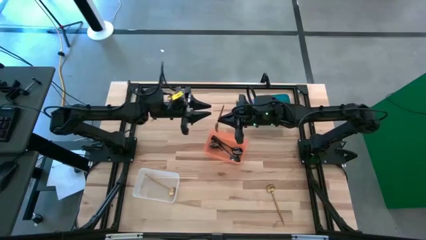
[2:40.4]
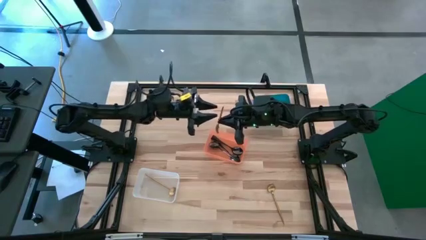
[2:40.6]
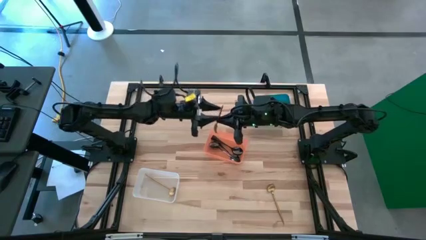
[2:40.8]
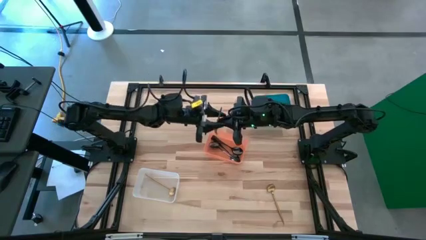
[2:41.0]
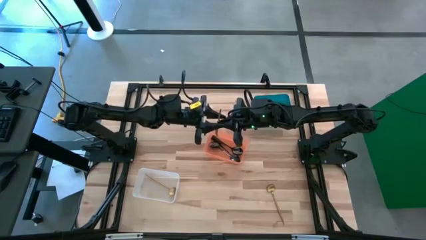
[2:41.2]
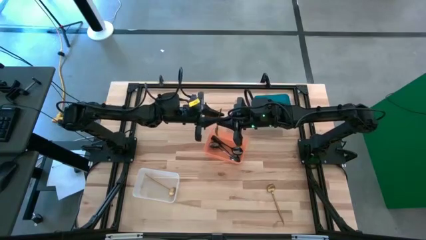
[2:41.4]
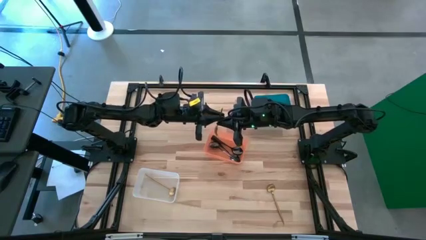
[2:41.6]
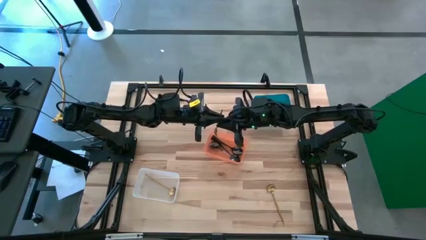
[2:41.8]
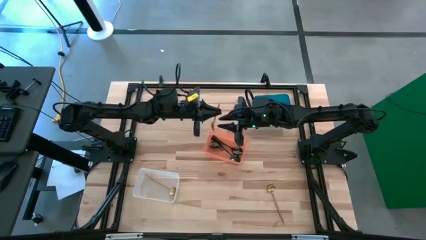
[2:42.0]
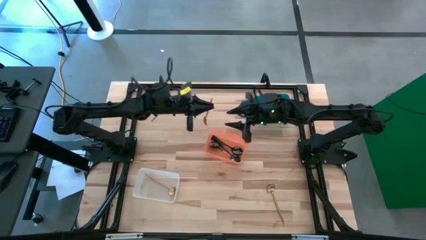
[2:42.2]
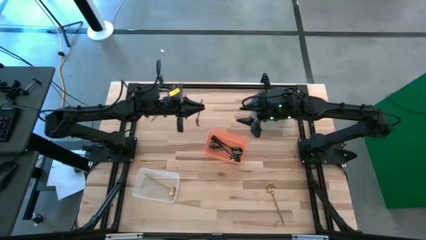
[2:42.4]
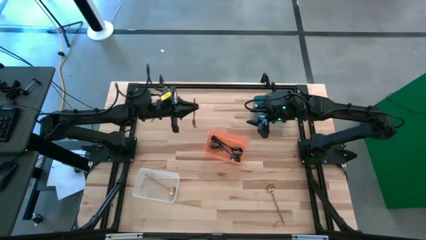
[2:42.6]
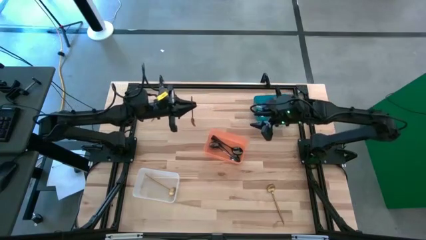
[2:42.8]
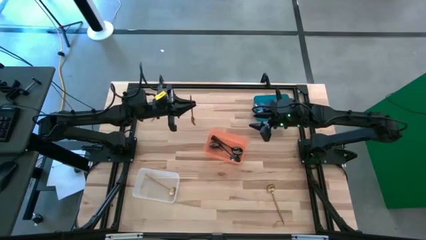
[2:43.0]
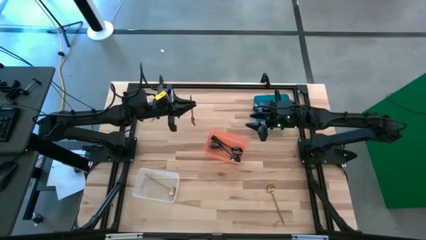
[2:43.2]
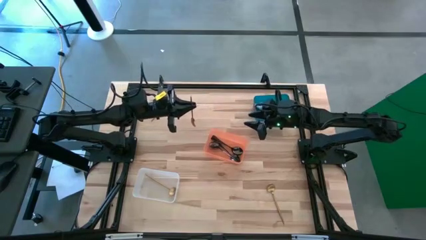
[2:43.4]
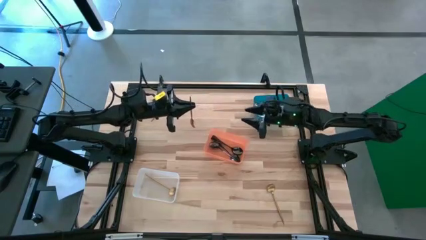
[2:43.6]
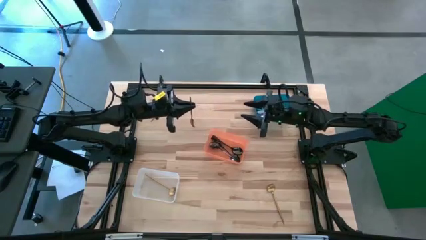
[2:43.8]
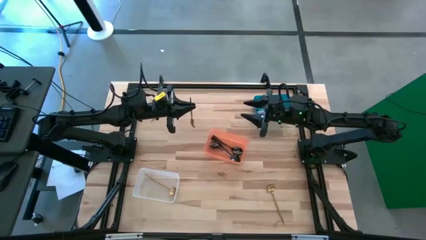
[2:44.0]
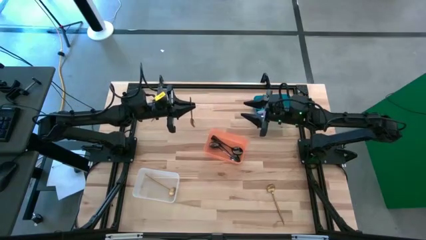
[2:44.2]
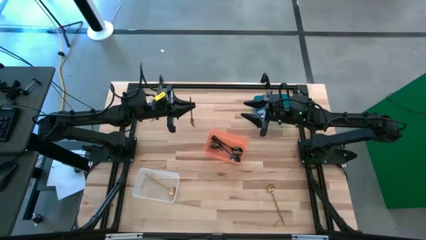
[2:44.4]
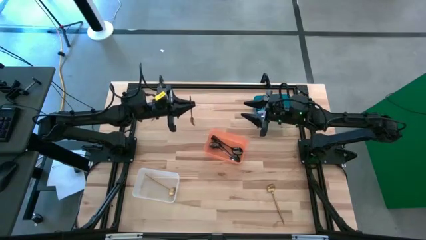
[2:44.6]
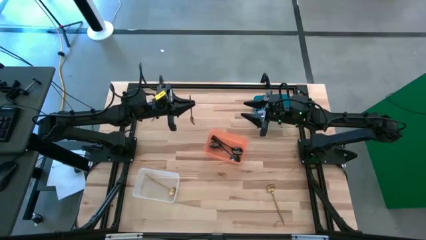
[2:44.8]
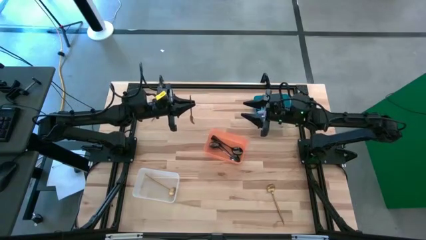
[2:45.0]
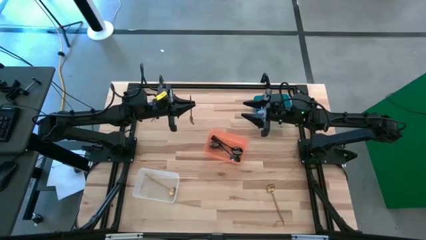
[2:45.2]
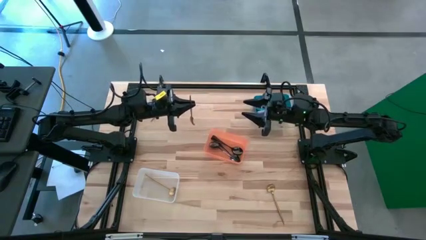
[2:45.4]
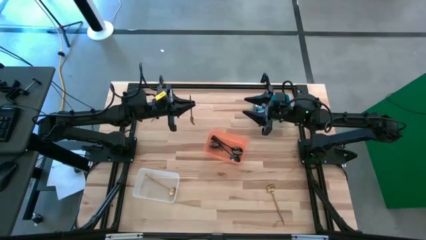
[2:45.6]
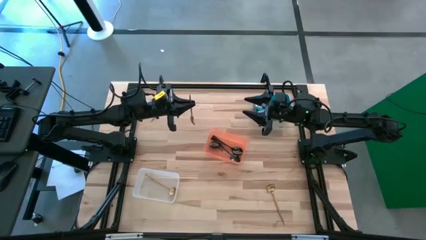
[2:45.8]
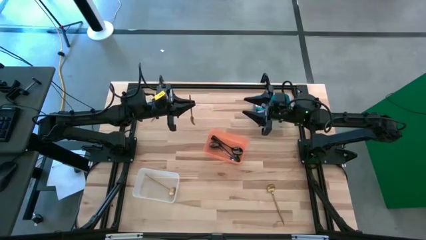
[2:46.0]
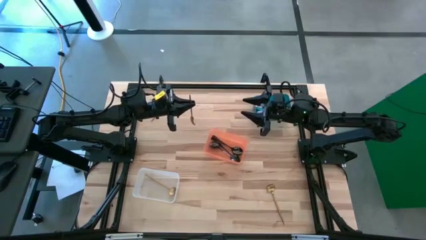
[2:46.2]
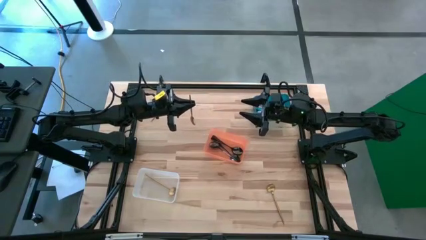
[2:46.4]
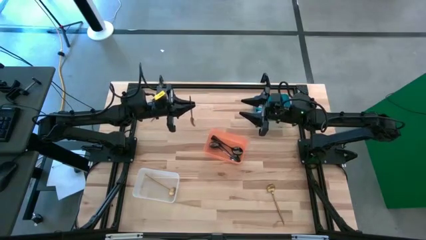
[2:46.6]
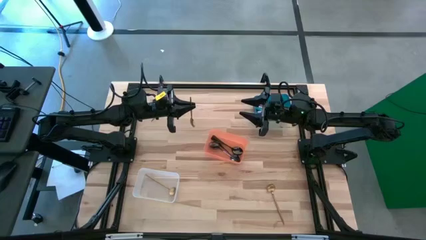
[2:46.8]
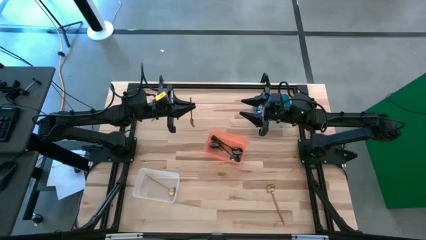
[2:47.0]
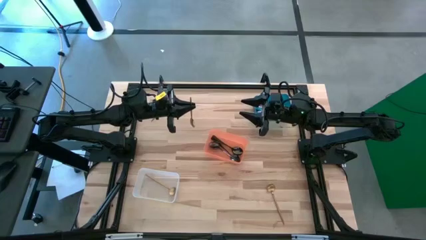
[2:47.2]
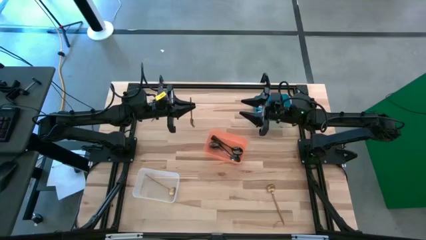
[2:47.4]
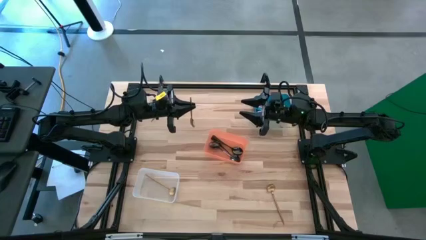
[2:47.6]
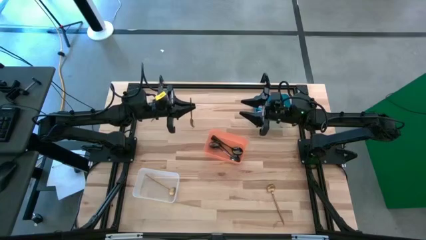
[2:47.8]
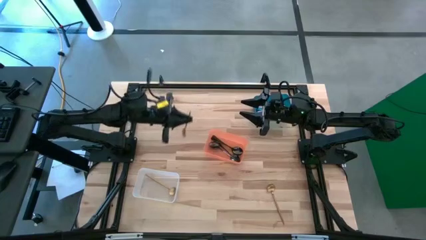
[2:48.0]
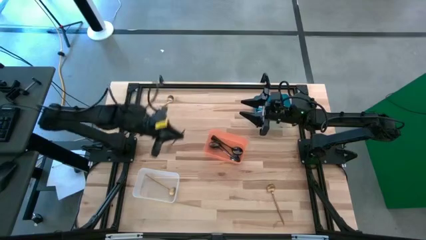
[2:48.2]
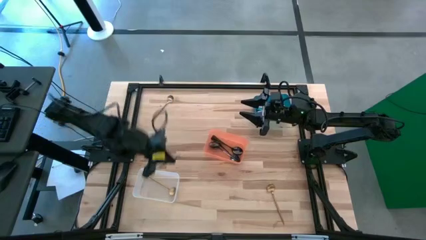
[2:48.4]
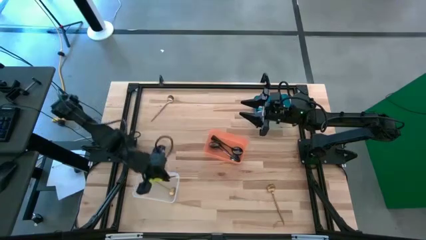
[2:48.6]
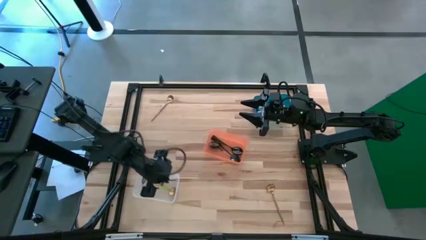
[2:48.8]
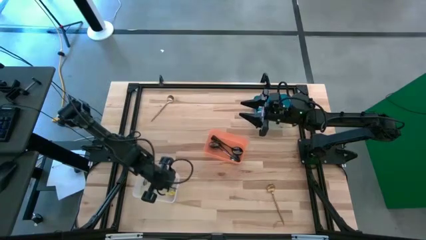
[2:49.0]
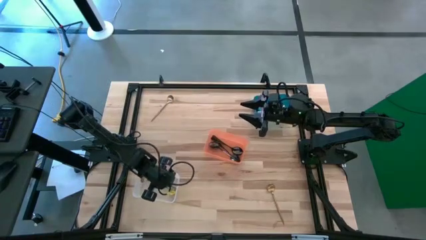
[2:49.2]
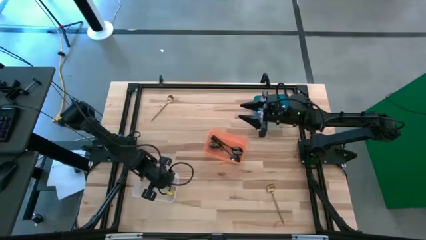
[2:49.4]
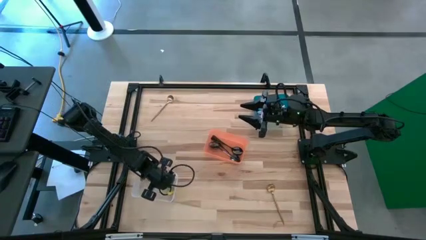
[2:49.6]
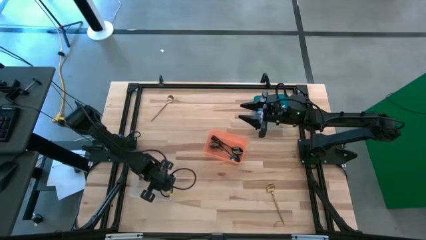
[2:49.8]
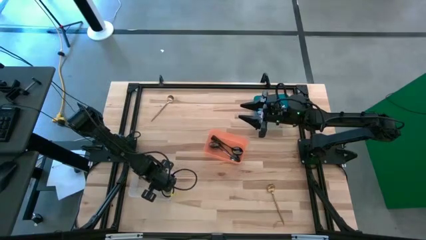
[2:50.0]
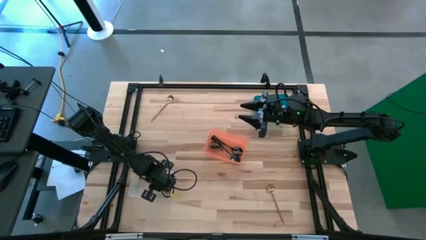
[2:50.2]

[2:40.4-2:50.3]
Task: Sort silverware by color (type)
Put the bottom right golden spoon into the white bin

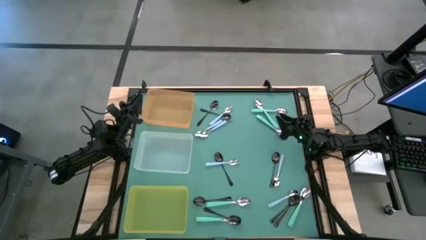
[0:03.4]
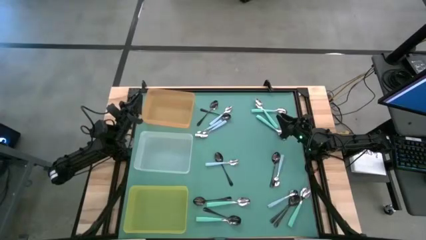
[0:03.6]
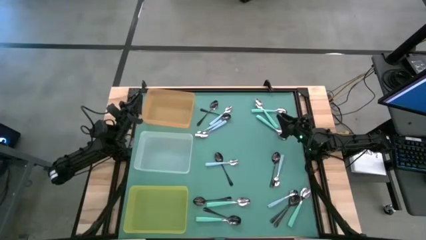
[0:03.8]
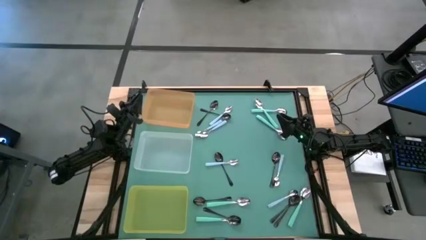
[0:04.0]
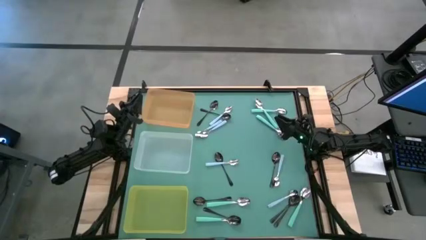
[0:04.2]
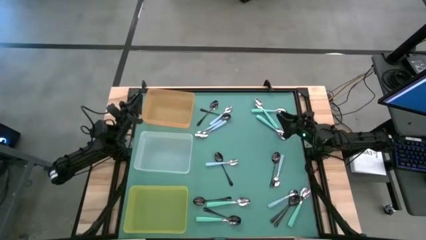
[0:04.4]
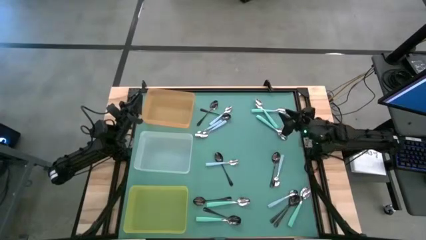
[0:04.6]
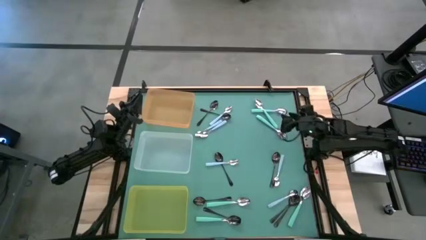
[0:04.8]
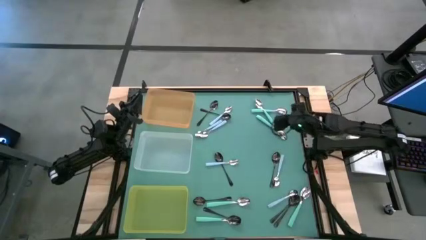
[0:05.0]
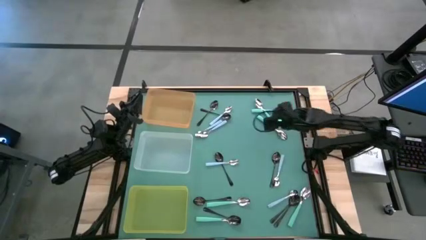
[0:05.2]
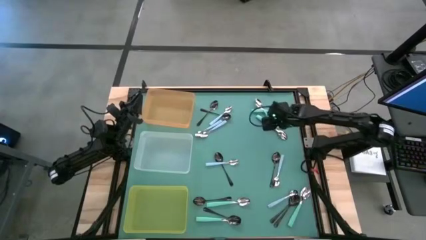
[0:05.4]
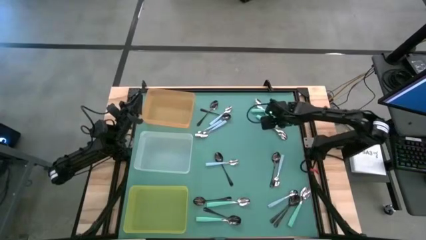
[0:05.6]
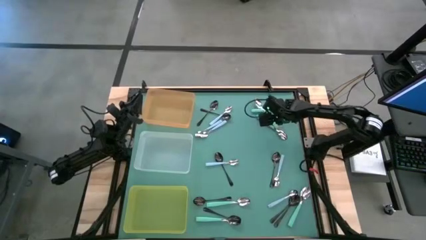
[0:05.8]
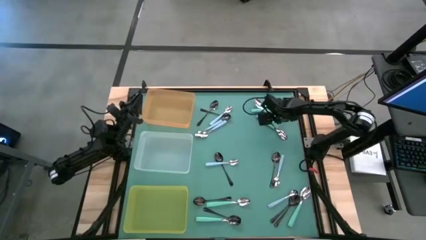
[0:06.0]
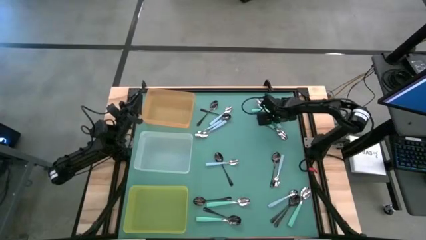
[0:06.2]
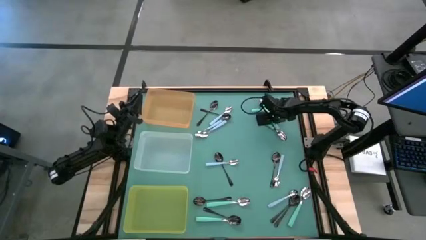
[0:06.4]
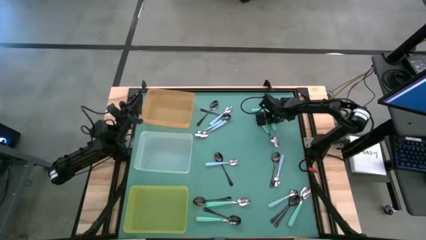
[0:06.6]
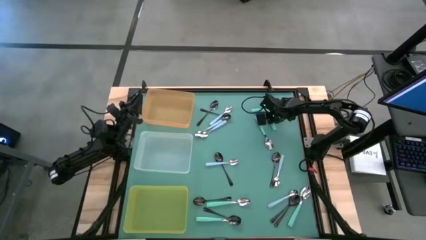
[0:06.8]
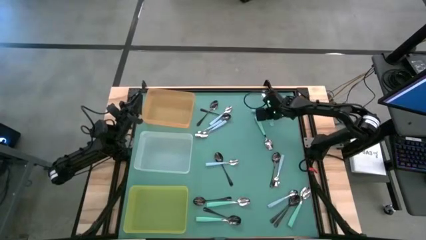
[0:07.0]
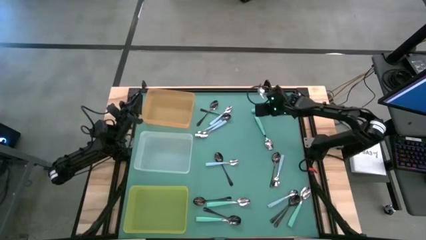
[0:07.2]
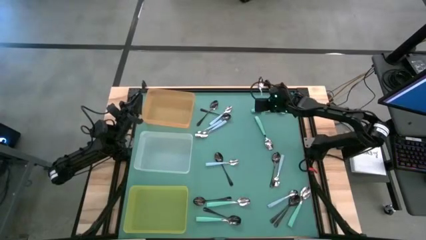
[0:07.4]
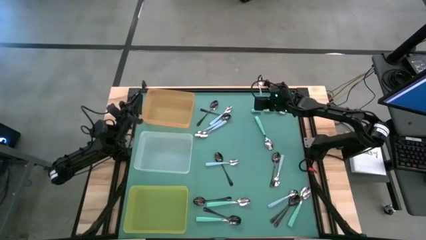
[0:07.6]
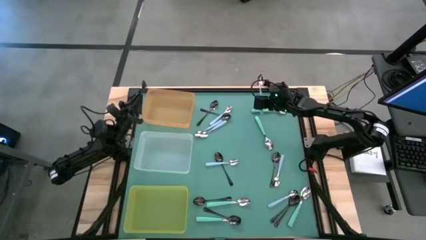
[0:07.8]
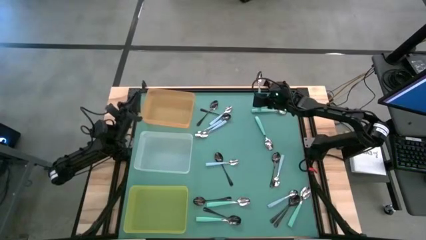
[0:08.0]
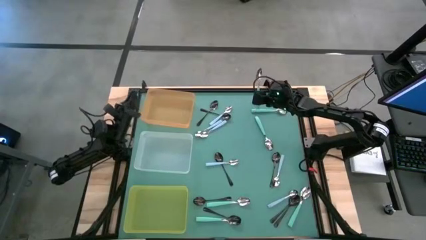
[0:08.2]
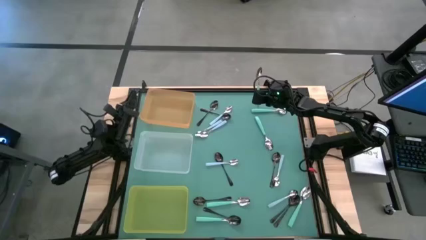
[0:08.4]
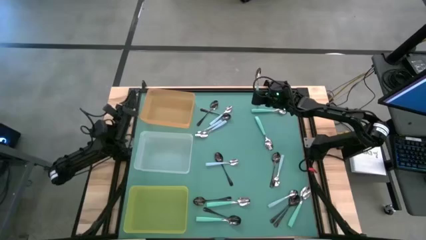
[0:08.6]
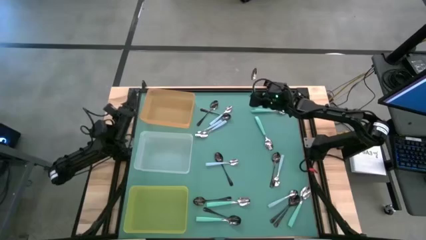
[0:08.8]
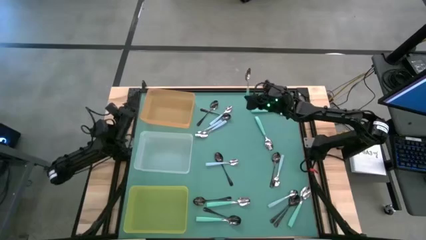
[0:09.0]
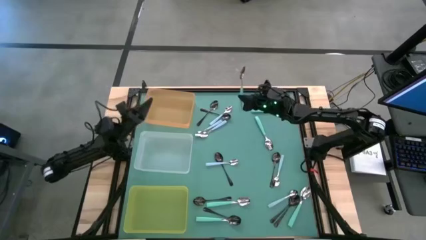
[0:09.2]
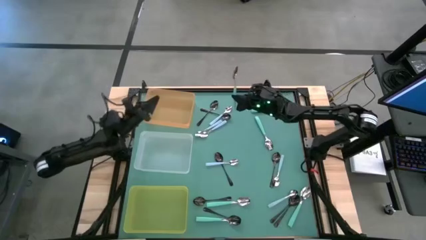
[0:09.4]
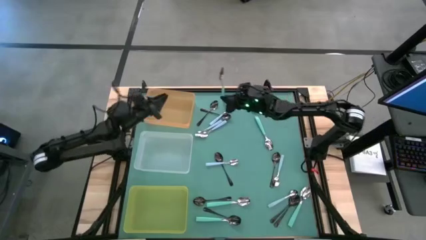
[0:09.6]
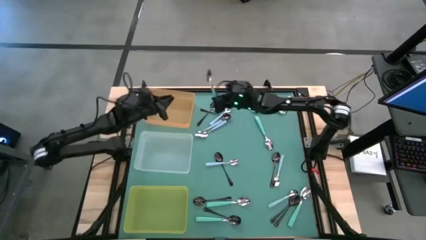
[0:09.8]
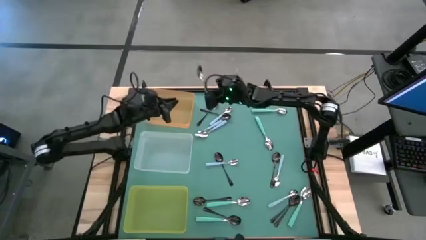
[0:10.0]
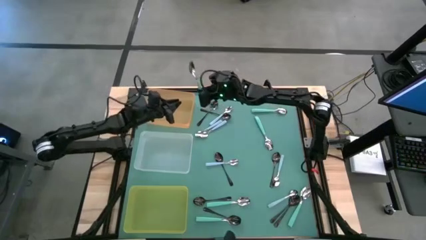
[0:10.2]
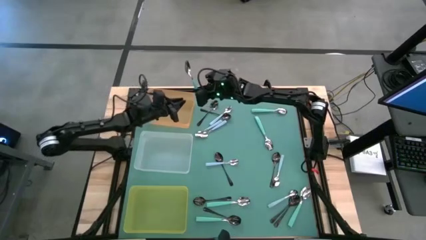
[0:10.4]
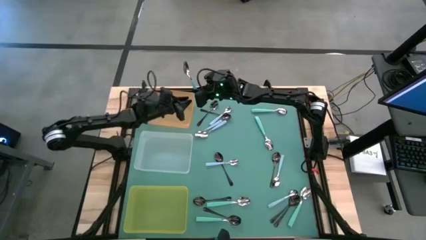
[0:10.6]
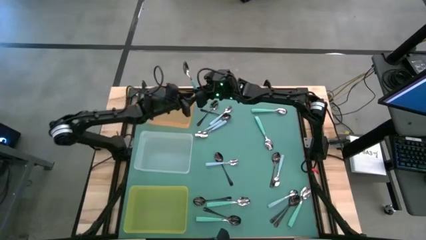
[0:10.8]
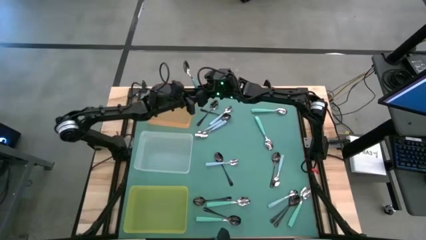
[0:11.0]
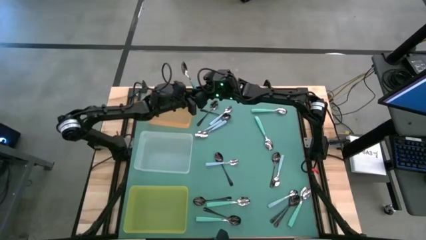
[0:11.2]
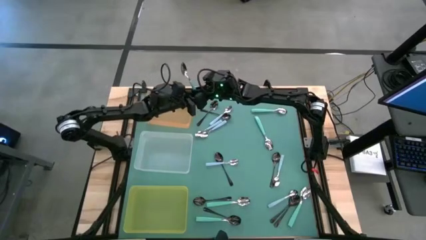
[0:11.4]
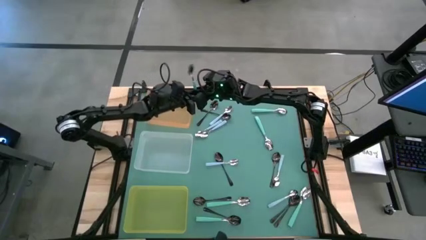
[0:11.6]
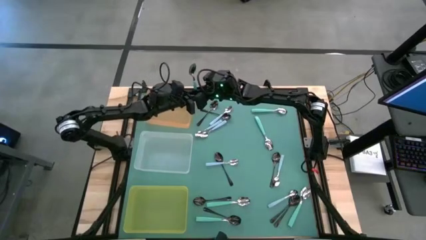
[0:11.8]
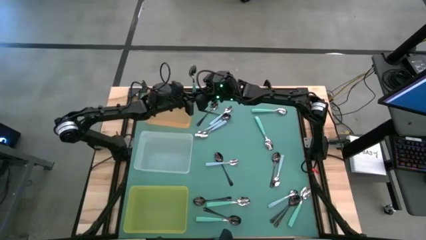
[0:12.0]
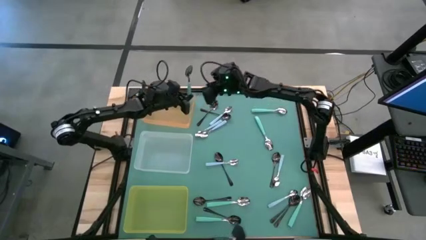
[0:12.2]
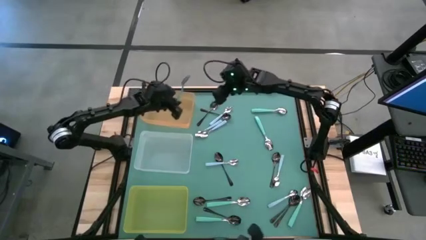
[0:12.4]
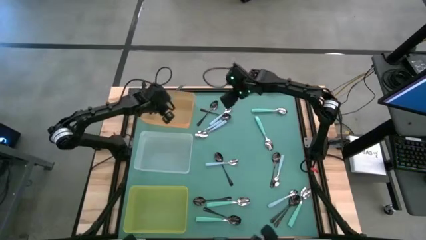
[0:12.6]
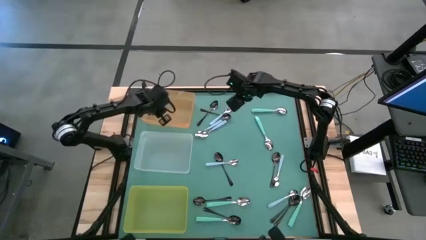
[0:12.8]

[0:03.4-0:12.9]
Task: Sort silverware by color (type)
Put the green spoon into the orange bin
